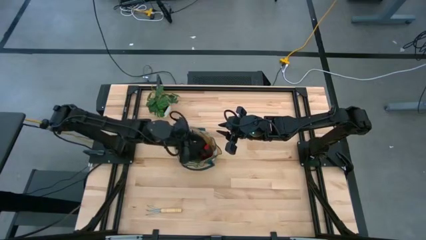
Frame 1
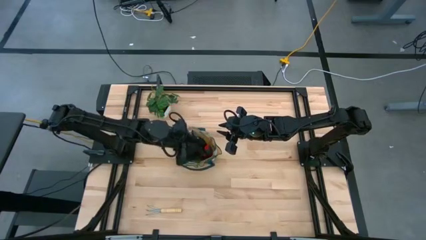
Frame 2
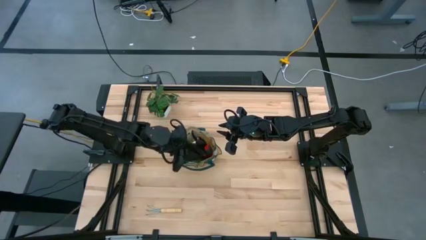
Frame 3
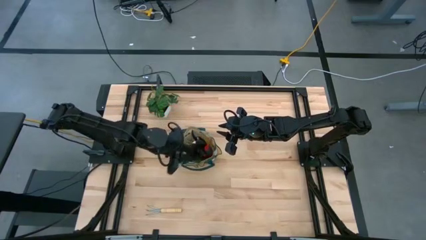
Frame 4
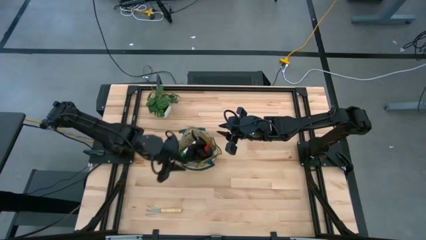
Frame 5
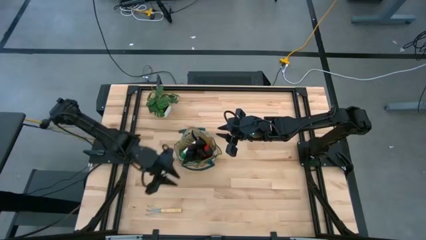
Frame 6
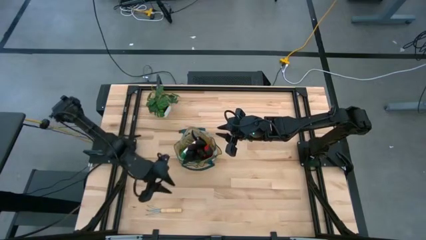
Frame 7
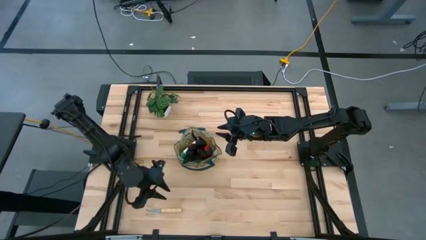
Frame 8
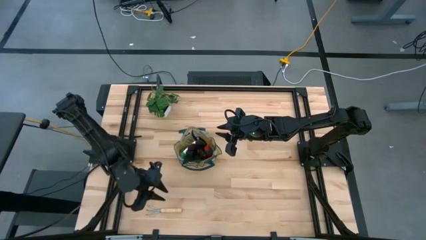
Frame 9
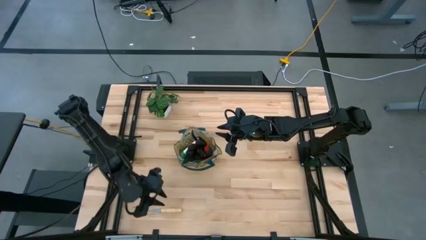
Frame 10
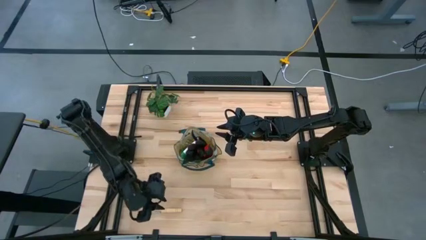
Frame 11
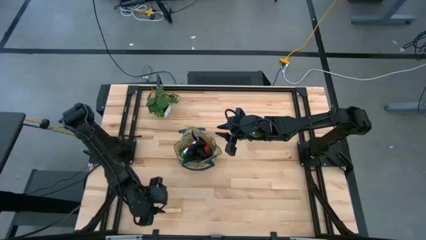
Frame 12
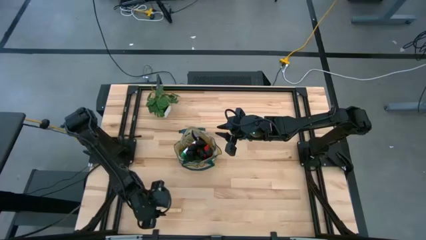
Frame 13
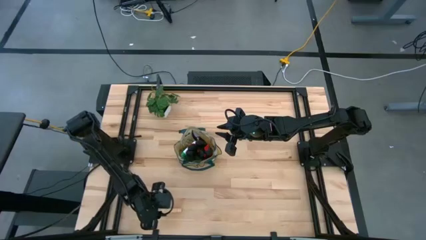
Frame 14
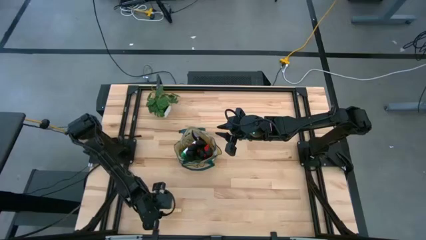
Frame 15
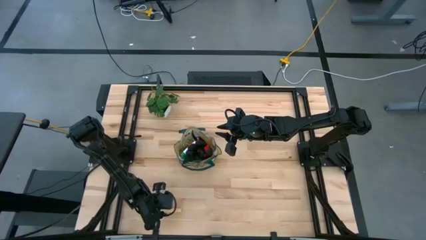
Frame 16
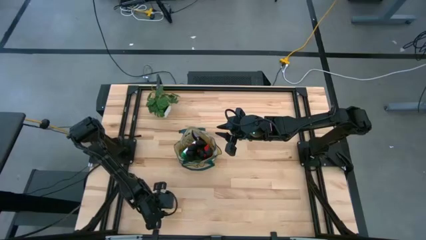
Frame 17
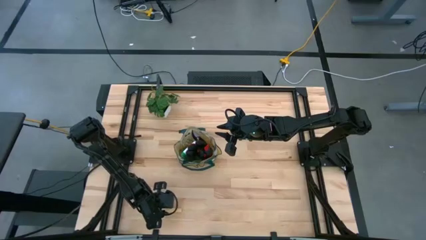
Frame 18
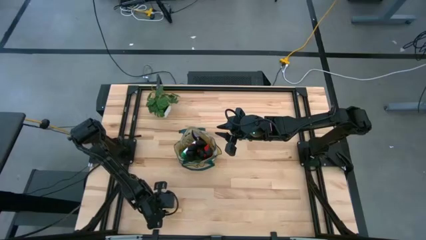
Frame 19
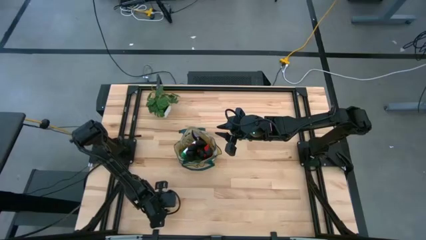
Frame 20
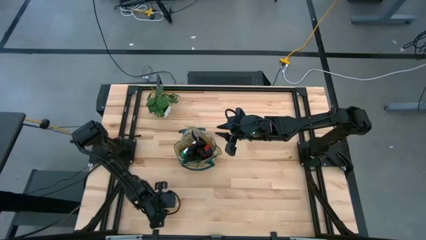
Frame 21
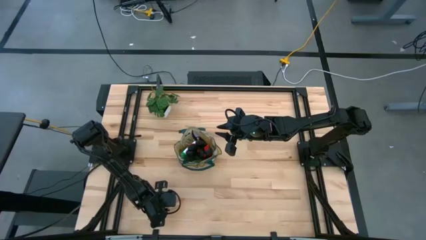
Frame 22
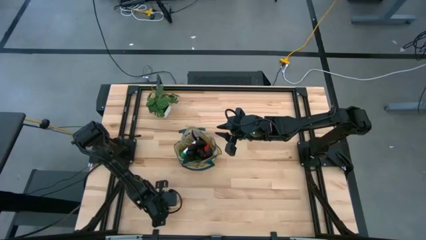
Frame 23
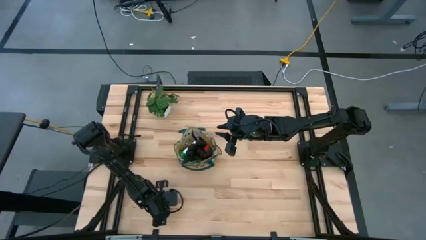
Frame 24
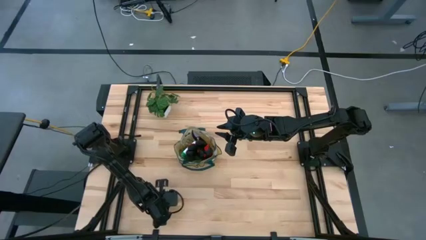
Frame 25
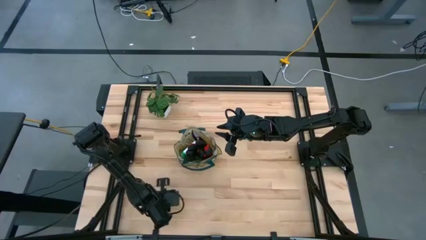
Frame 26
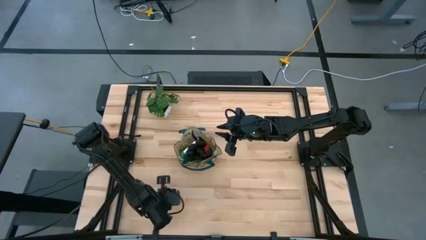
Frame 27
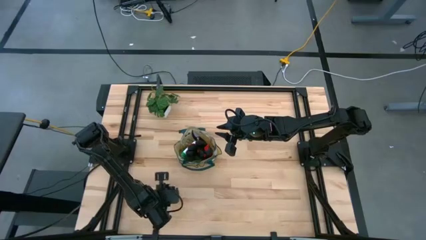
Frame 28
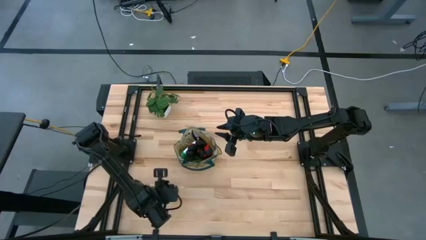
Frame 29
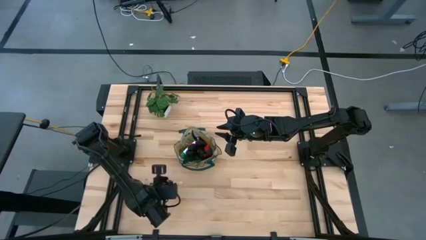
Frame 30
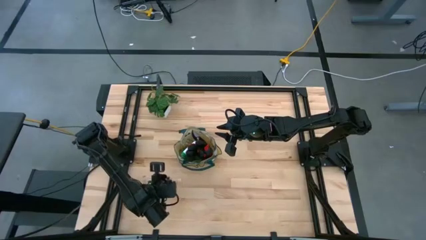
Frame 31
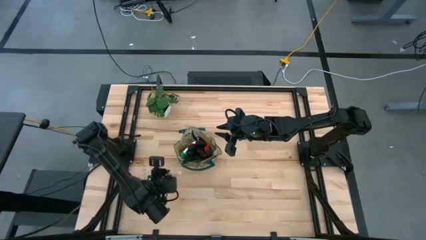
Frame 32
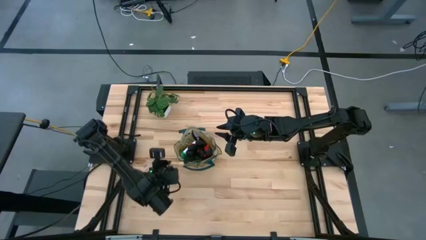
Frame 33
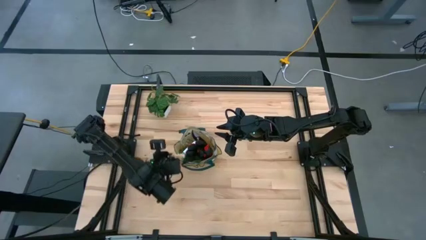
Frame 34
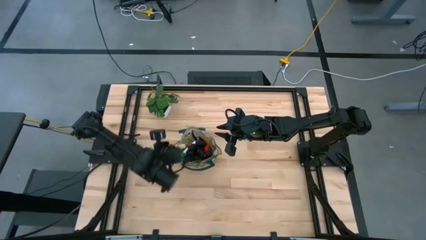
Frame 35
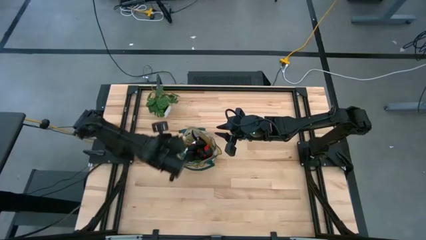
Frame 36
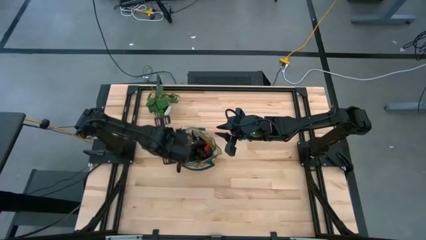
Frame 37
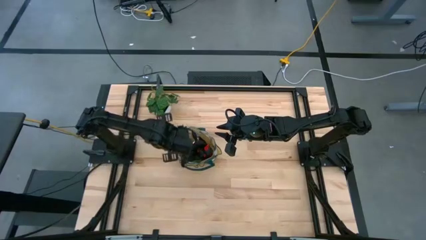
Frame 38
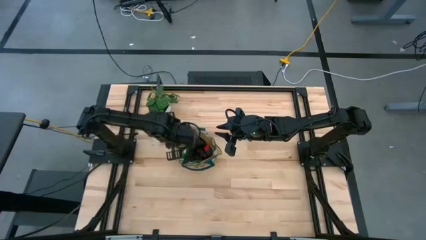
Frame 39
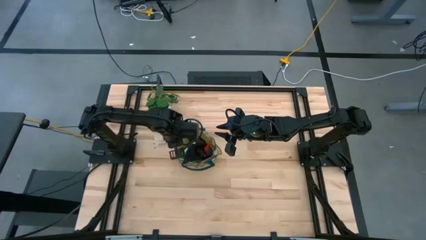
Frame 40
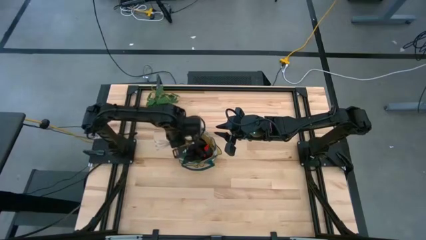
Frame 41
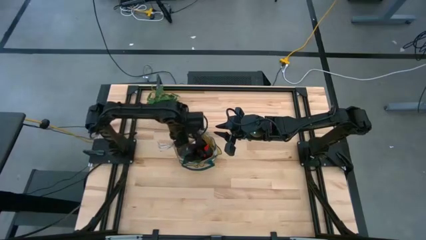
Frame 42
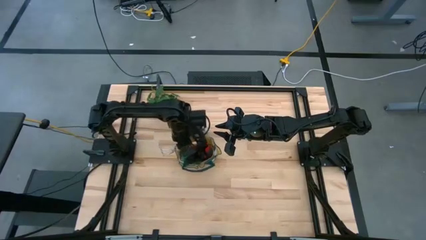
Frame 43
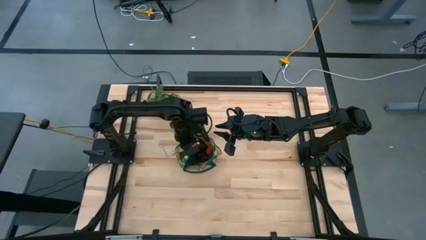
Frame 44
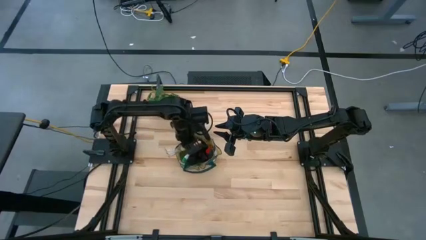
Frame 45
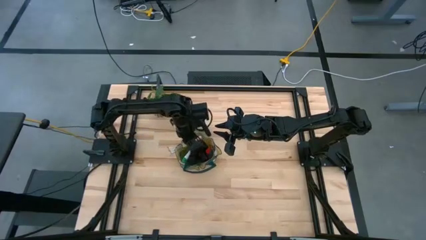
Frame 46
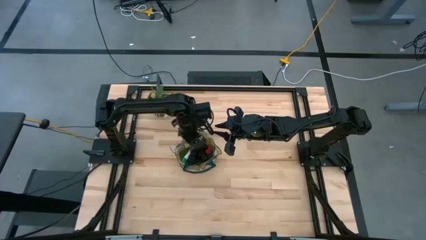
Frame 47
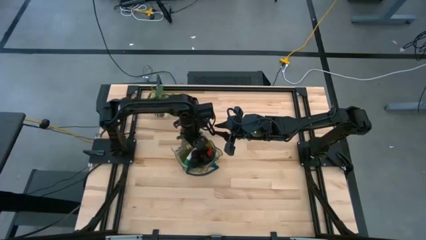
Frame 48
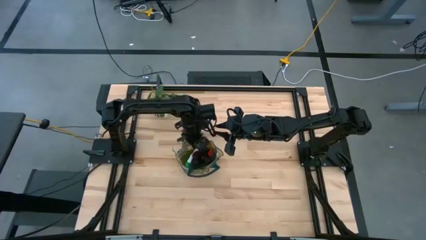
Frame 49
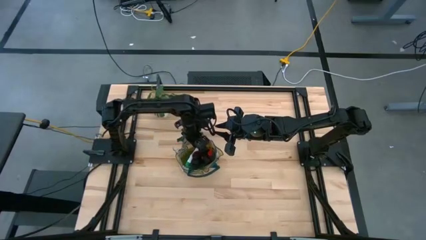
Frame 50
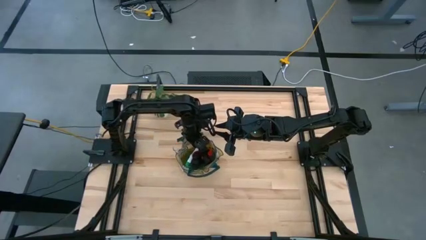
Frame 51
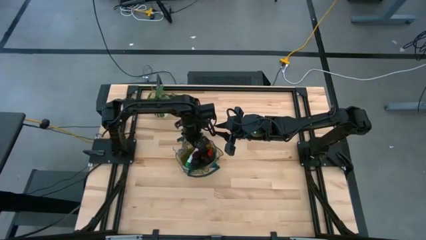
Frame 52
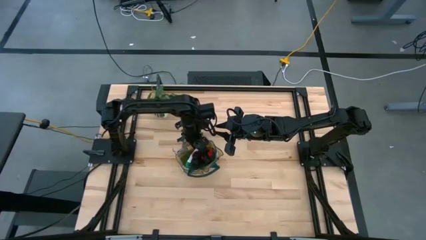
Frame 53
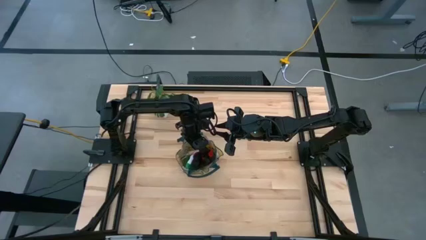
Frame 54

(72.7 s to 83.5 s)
Task: Pick & Place Garden tools in Gardening bag
Put the hand rake into the gardening bag
